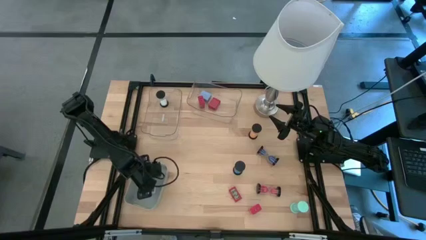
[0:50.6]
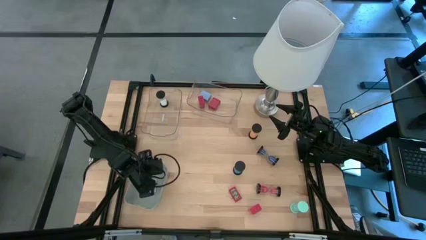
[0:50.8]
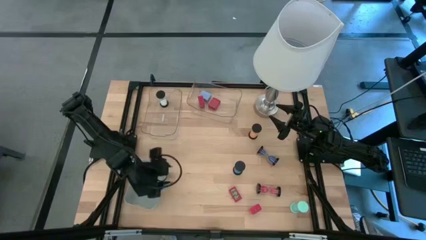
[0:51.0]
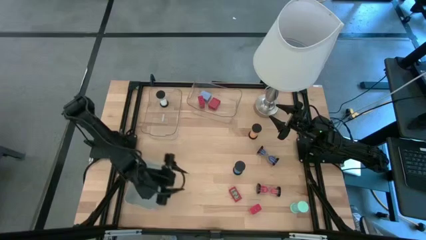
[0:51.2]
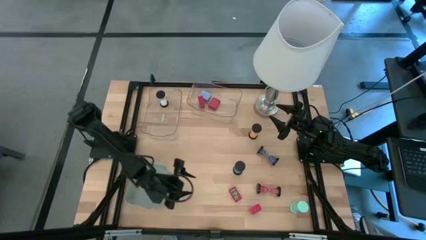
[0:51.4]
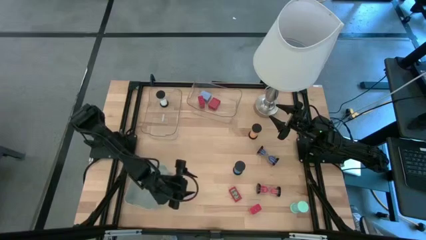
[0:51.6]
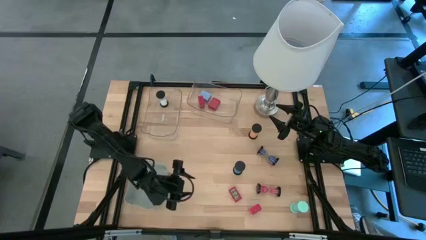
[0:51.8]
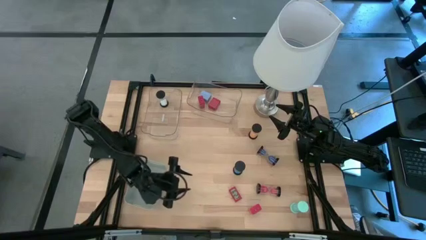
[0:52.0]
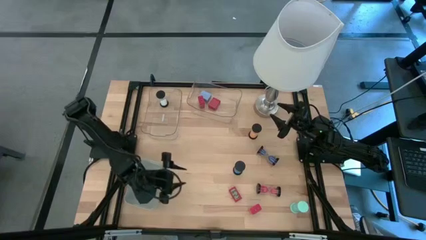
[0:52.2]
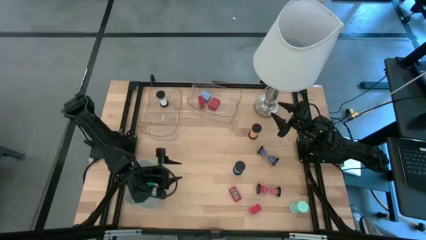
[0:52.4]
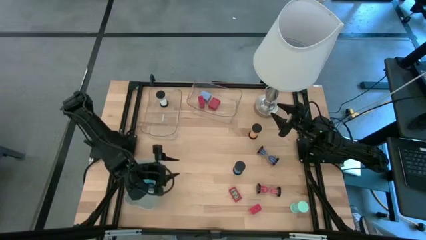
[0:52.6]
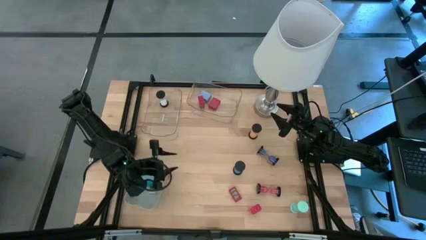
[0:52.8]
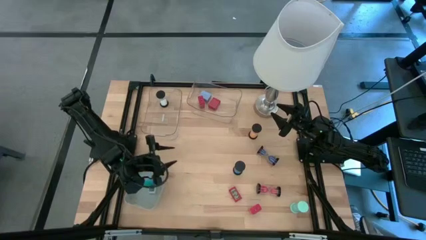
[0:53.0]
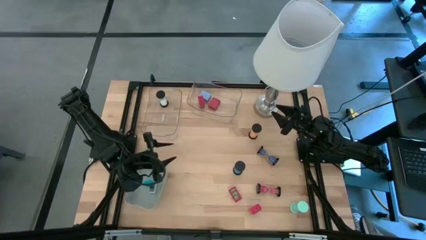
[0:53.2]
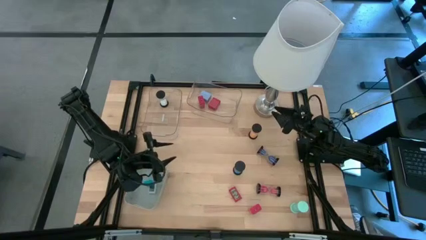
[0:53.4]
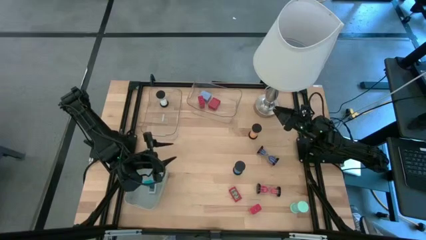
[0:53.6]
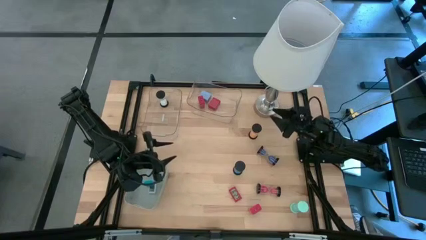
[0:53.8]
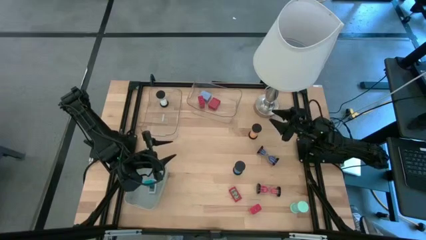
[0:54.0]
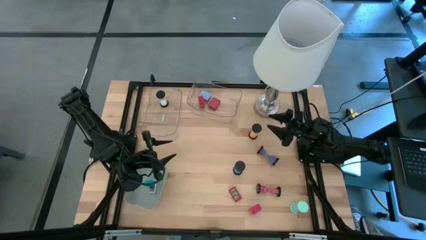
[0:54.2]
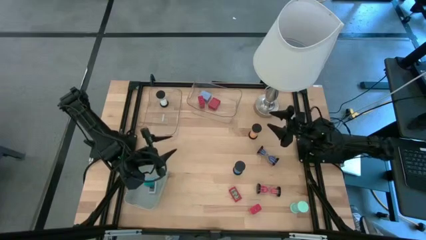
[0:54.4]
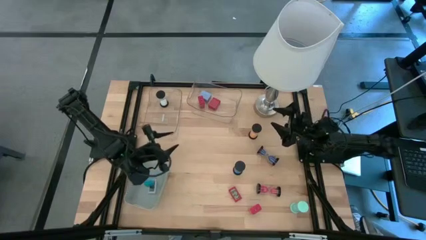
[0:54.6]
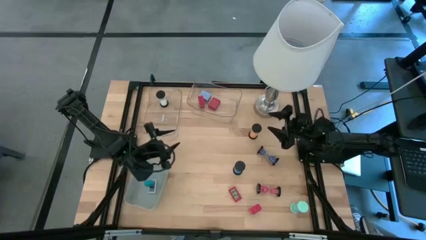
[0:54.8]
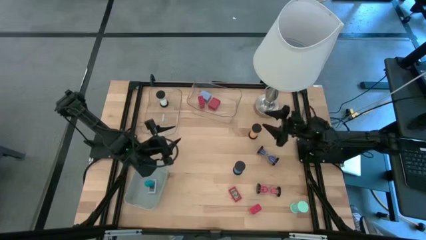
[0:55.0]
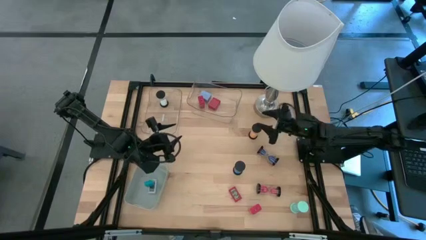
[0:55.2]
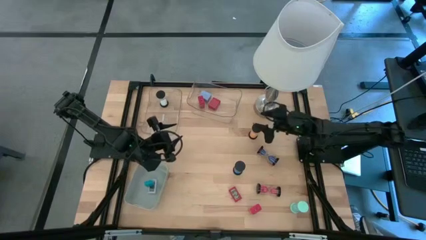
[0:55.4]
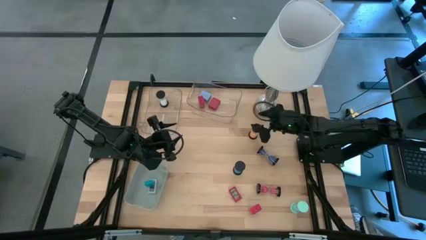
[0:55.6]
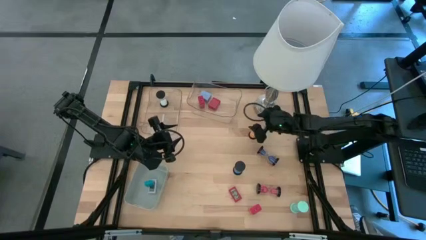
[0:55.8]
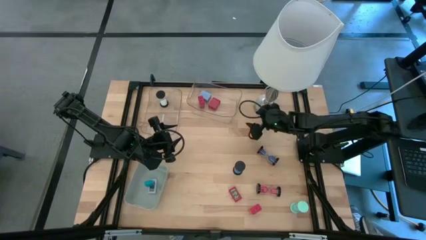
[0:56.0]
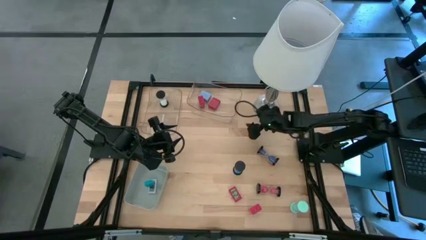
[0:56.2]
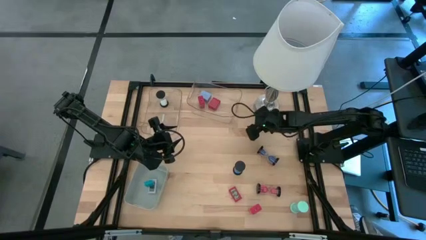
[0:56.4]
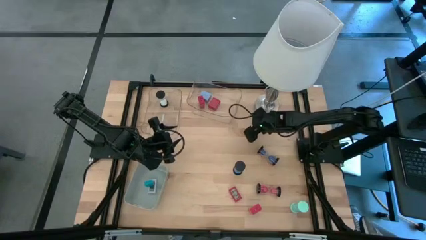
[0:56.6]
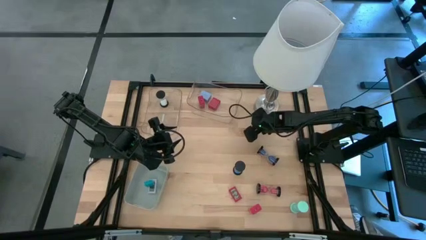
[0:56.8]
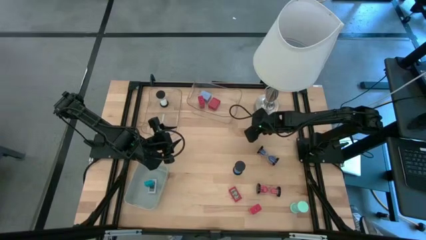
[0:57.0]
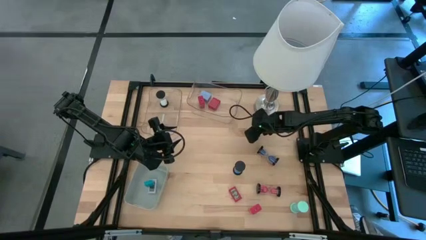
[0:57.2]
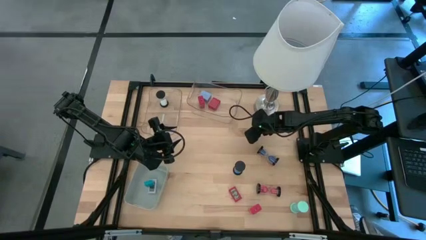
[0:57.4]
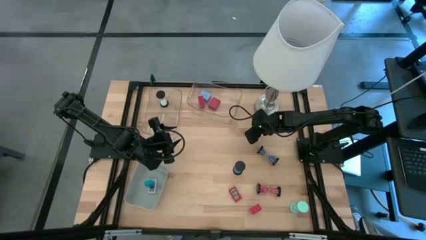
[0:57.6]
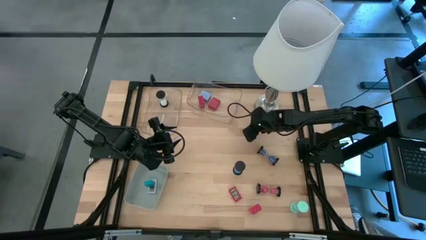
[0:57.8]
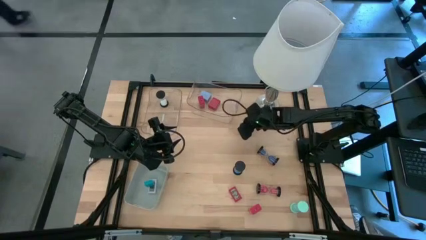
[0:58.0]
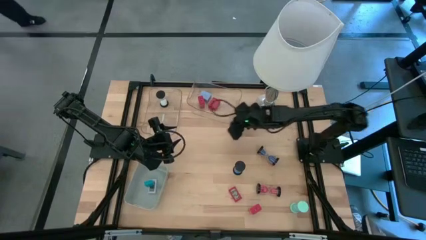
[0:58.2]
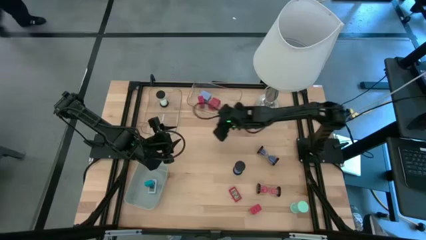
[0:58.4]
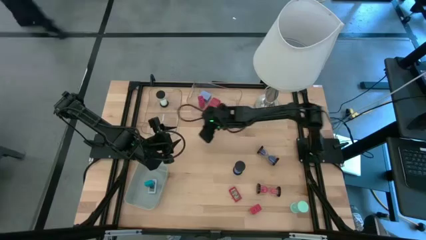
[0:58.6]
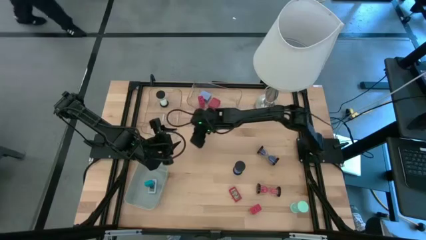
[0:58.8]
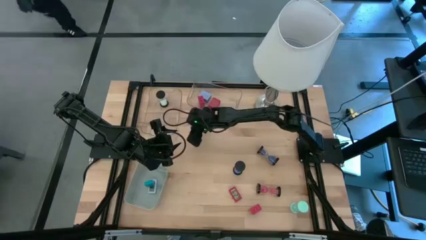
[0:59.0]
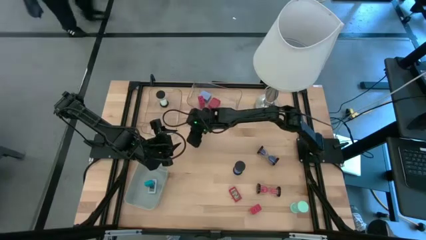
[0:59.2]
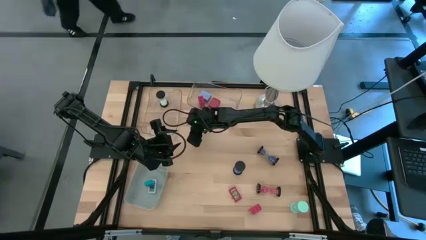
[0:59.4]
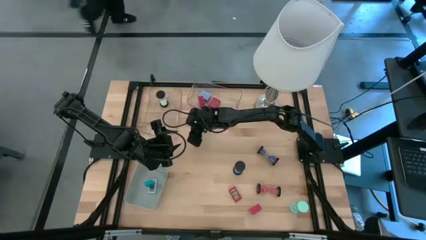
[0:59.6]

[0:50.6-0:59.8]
Task: Pick & Place Office items
Move the orange hourglass from the right to the left side of the table

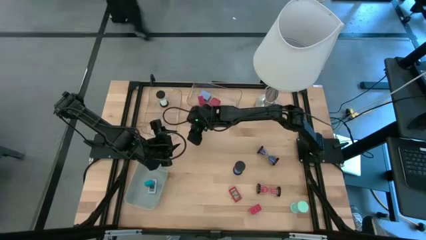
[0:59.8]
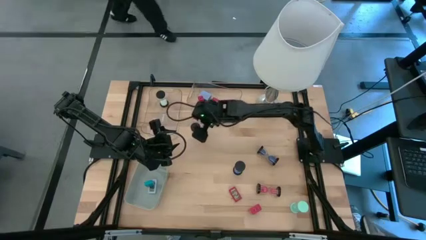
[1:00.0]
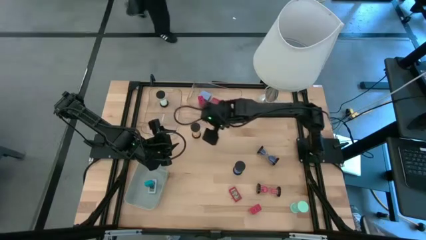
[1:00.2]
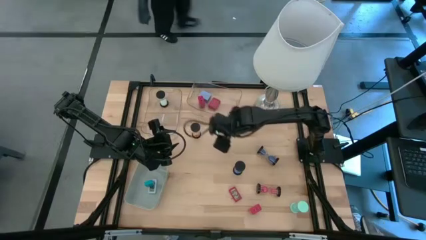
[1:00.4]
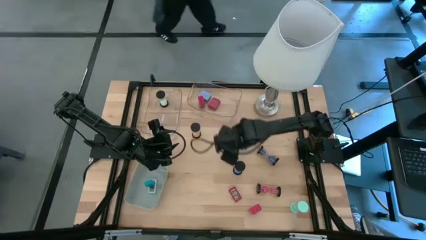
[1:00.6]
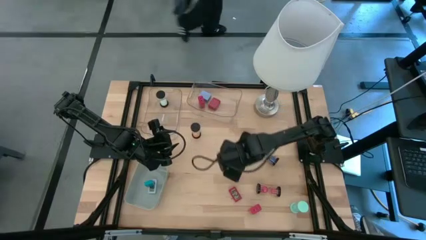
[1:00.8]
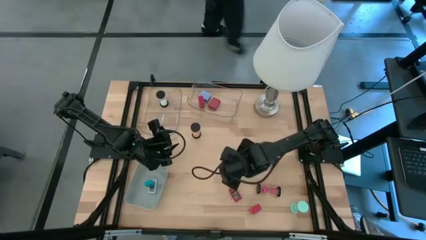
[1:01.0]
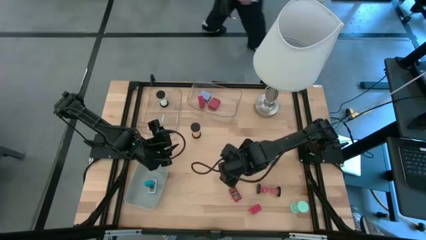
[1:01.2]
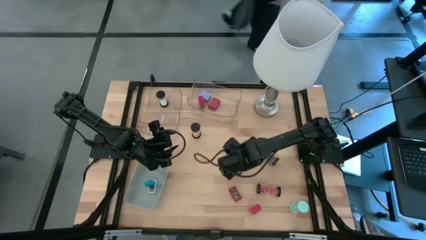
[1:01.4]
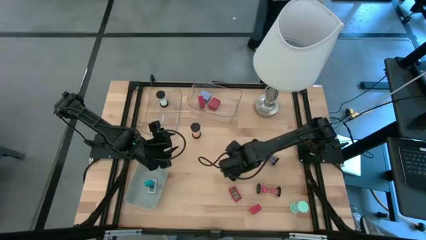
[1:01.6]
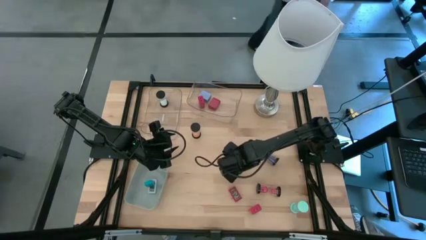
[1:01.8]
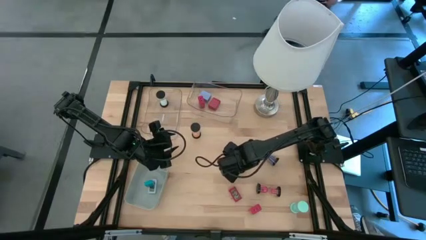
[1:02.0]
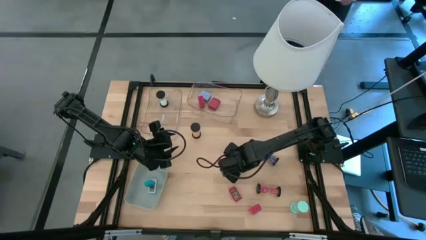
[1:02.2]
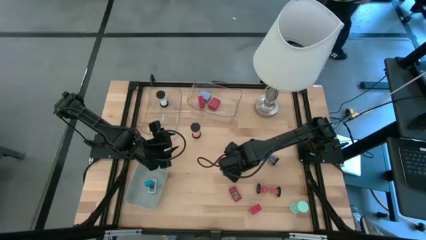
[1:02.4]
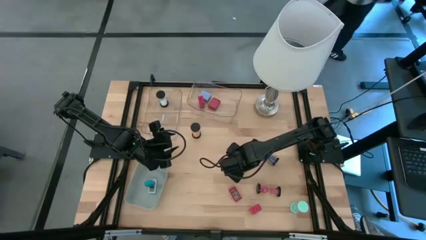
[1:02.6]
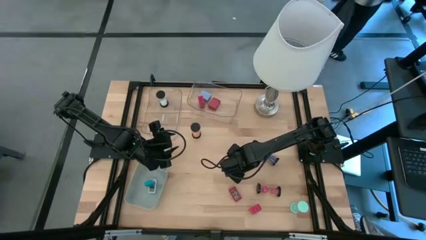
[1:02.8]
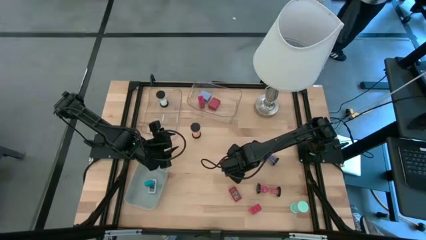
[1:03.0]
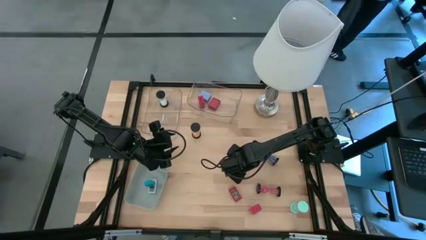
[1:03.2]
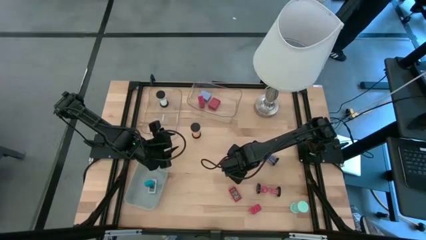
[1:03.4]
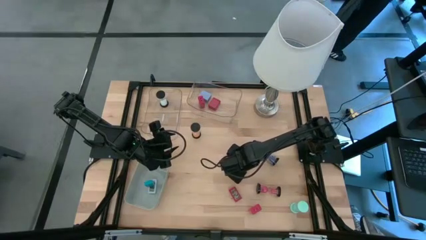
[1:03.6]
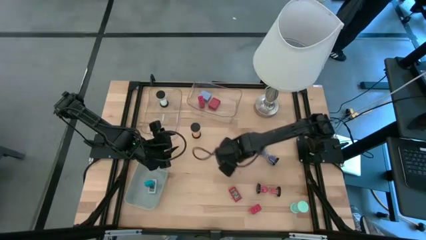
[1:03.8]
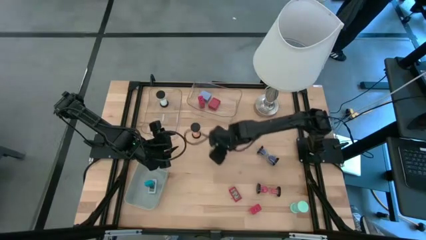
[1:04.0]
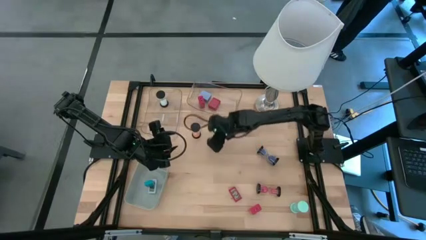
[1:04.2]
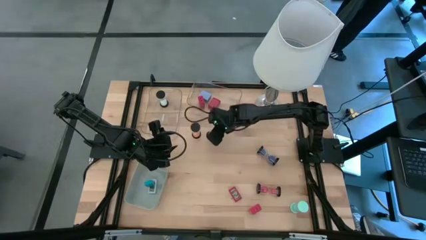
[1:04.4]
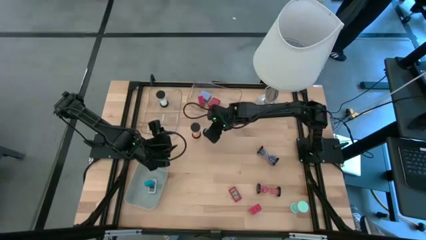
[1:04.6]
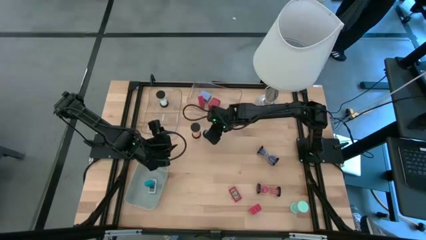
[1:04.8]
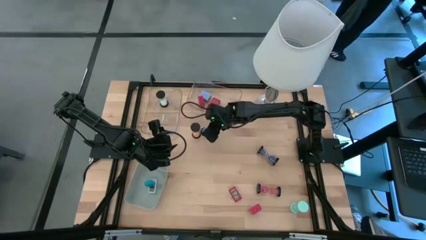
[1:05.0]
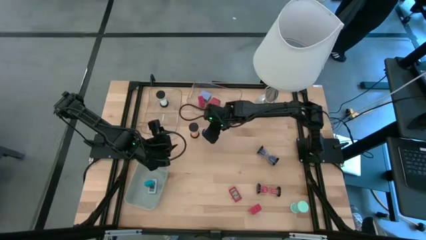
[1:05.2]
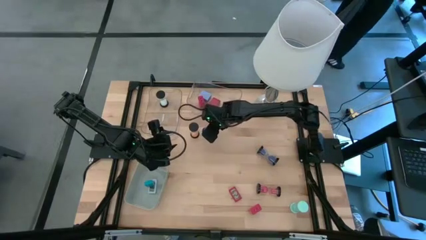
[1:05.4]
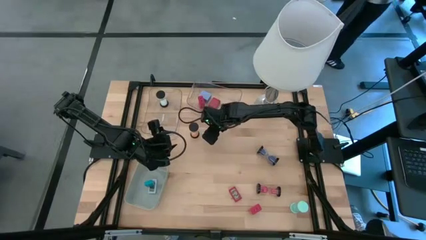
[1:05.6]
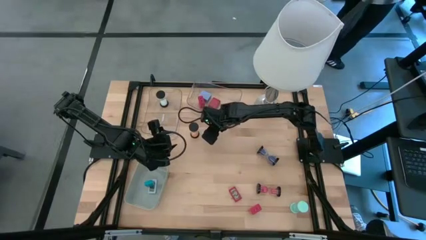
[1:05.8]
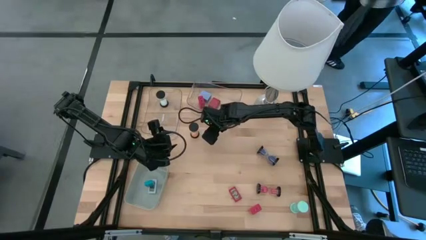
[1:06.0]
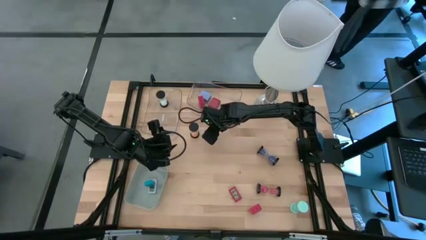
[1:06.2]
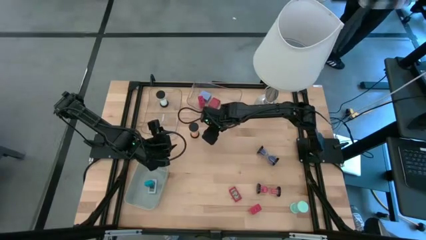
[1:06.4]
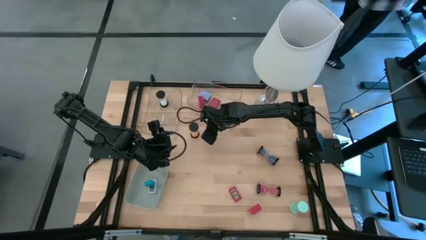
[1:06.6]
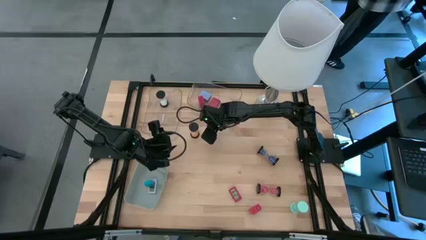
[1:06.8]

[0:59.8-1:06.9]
Move the blue hourglass from the center to the top side of the table
